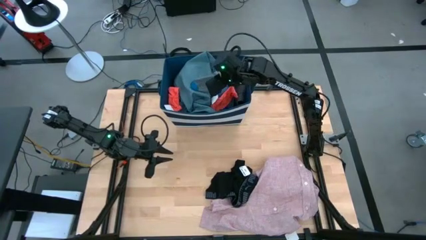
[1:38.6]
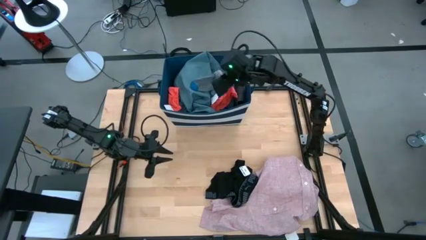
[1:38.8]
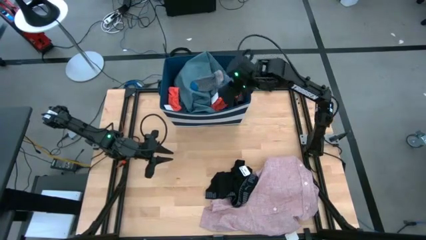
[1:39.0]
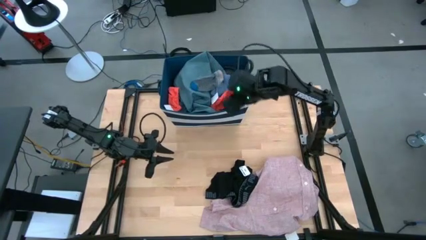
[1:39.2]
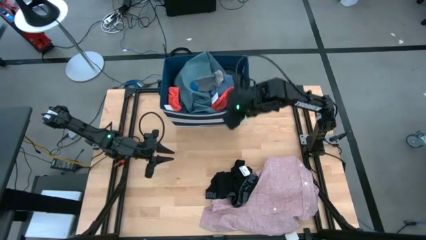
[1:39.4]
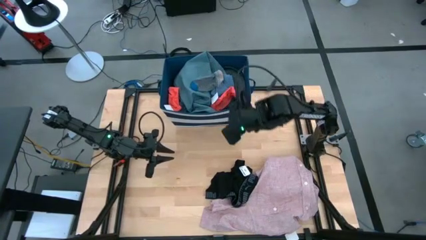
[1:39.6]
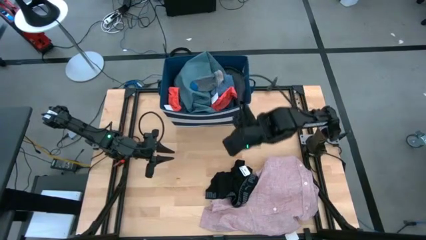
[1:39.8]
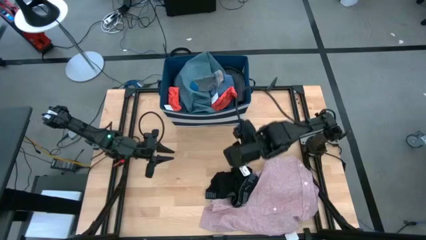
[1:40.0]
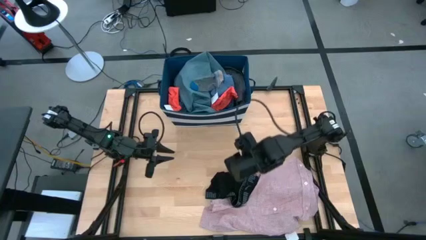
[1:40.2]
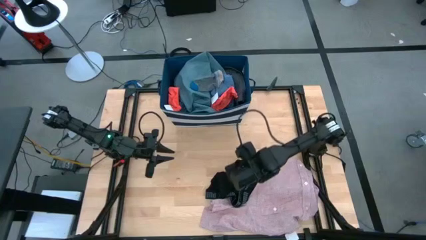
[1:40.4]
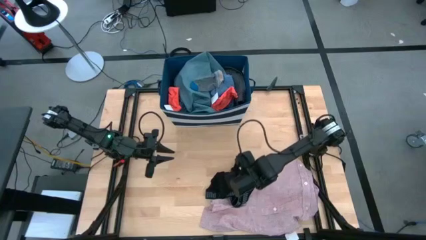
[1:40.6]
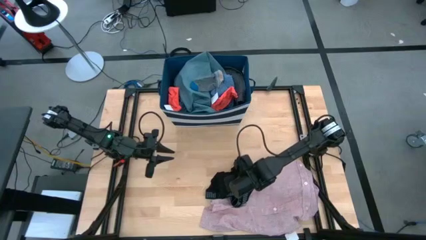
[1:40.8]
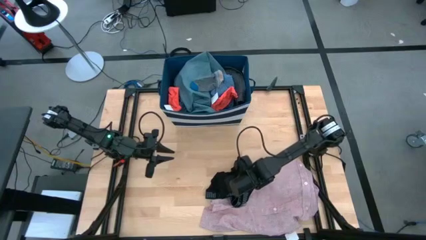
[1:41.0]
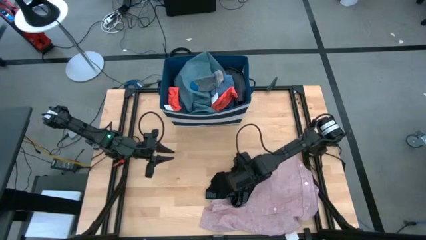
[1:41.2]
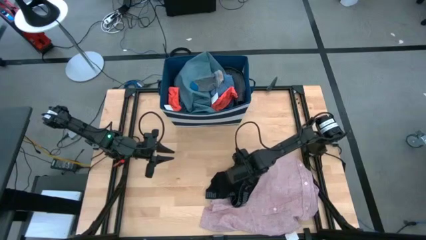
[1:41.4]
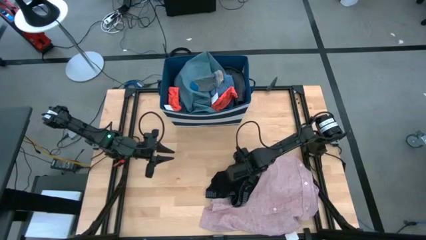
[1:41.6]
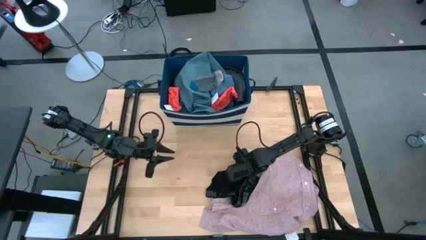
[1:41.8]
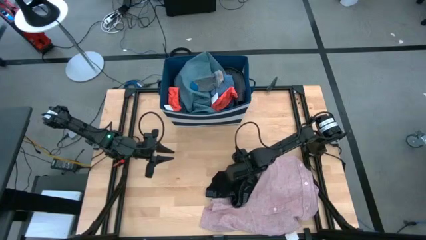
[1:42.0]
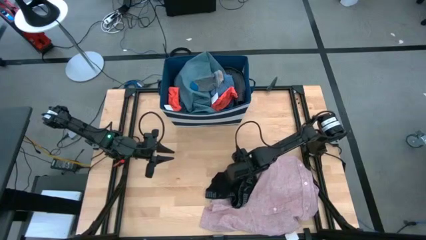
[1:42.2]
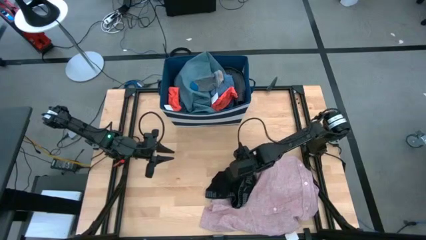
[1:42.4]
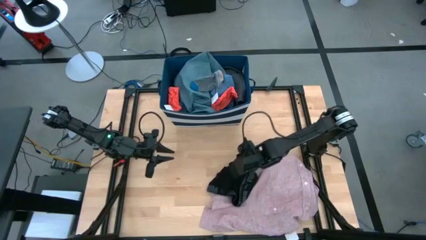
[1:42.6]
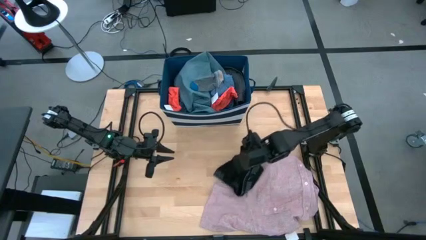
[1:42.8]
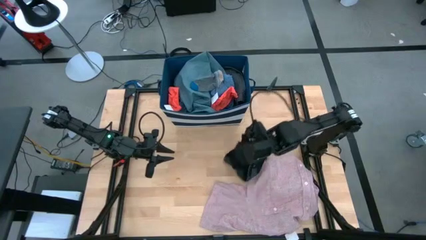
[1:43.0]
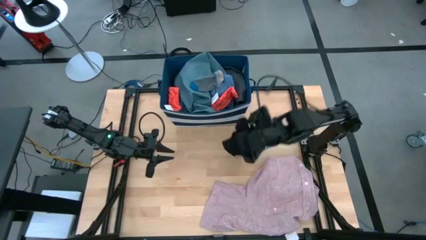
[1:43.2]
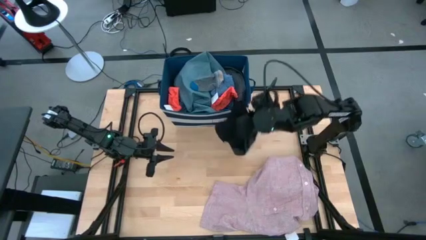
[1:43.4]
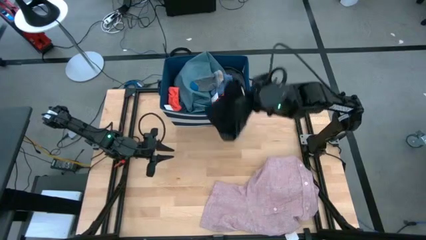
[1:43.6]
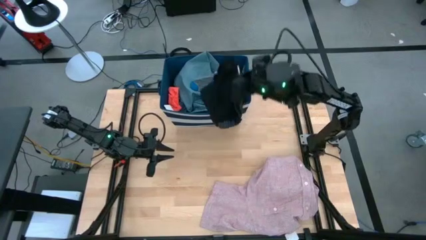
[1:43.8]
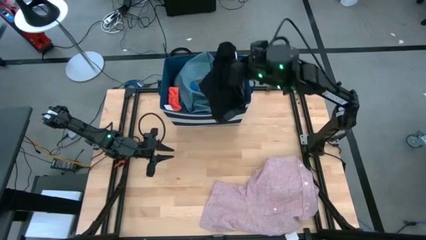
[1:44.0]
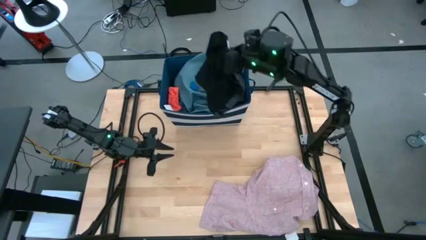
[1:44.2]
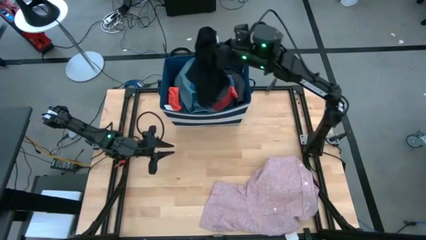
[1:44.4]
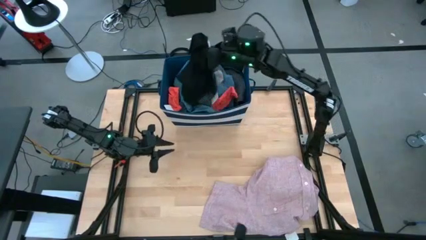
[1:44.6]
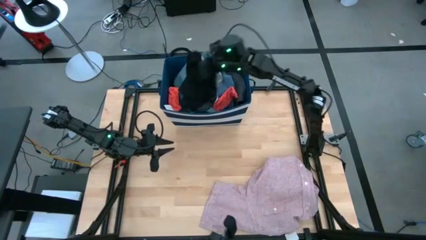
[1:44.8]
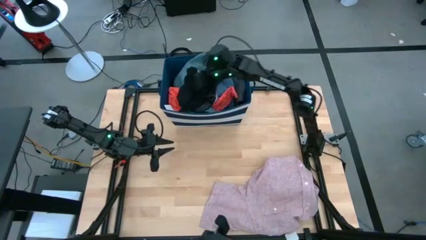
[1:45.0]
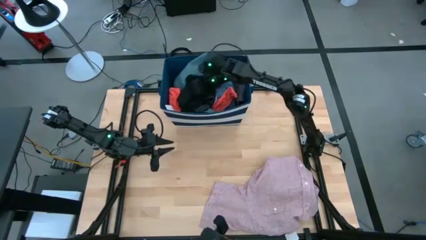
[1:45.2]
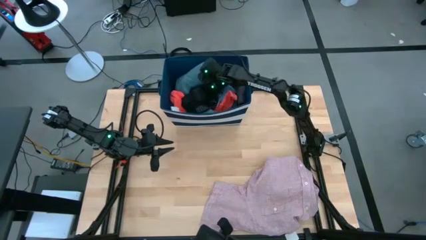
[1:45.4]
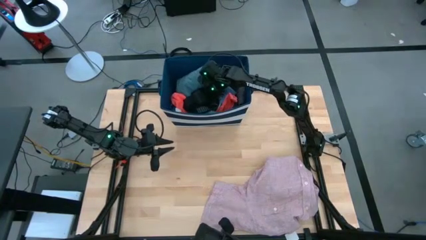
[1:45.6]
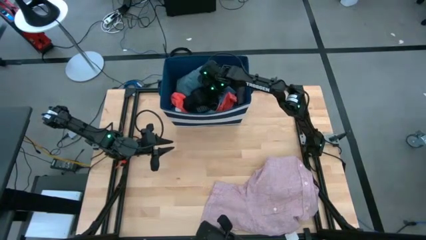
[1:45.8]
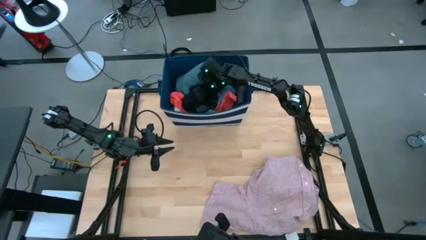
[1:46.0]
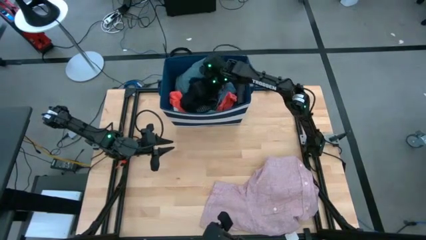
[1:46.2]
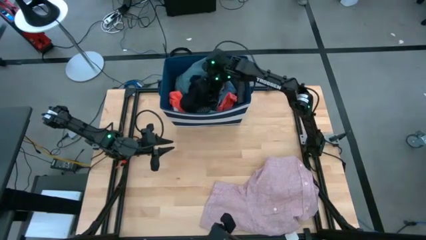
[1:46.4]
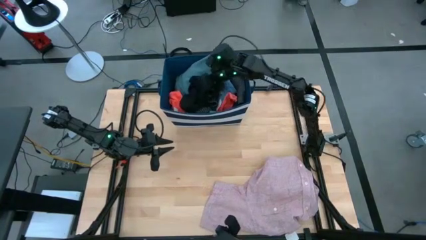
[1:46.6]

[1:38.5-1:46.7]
Task: Sort clothes
Put the black underwear into the blue bin
